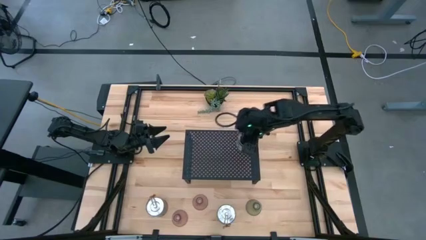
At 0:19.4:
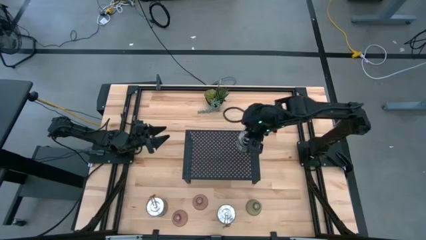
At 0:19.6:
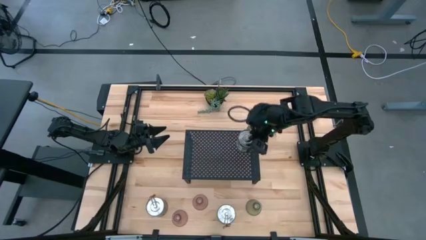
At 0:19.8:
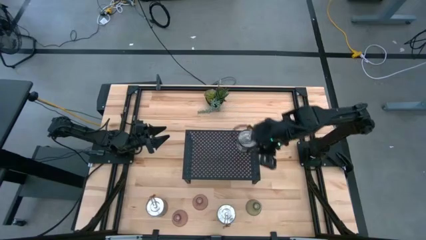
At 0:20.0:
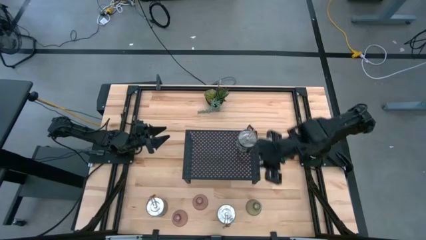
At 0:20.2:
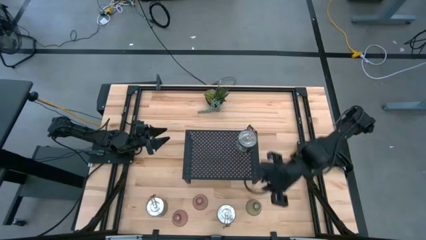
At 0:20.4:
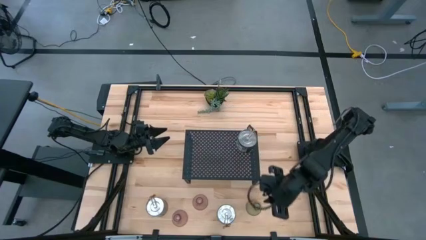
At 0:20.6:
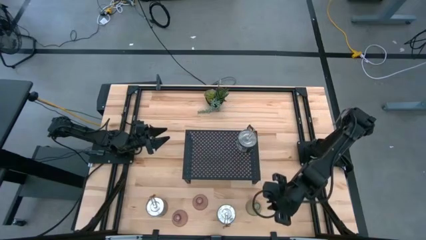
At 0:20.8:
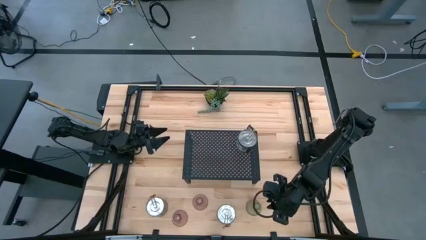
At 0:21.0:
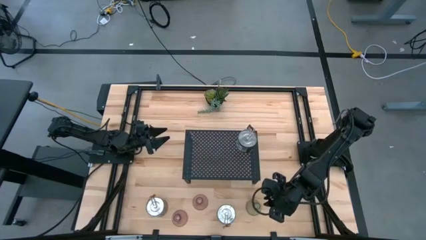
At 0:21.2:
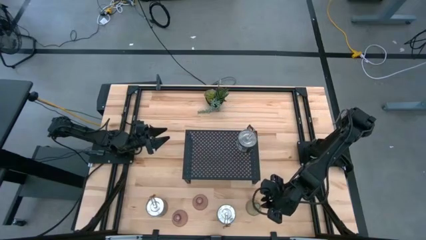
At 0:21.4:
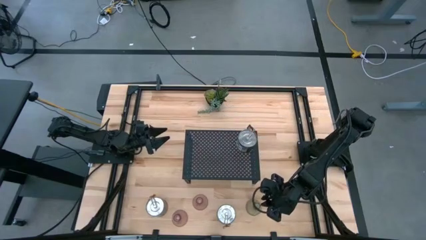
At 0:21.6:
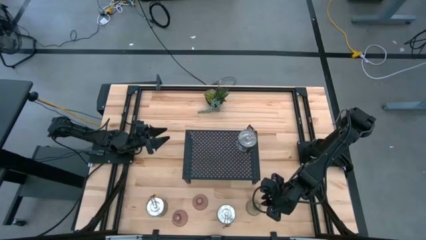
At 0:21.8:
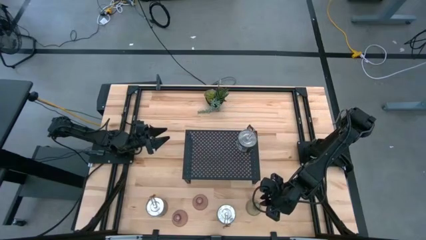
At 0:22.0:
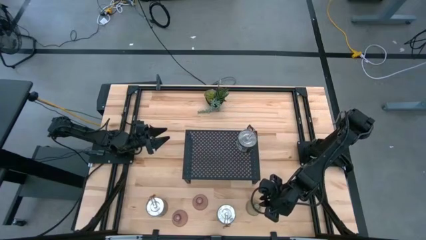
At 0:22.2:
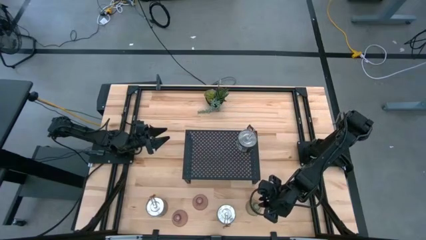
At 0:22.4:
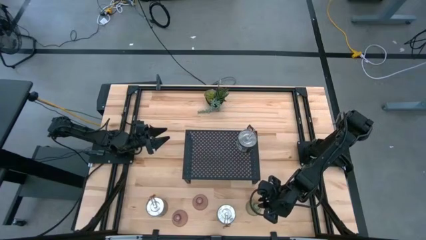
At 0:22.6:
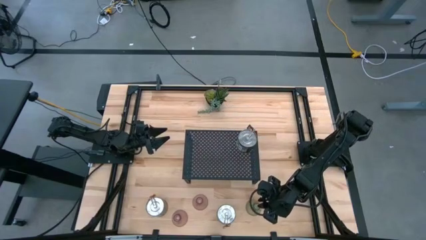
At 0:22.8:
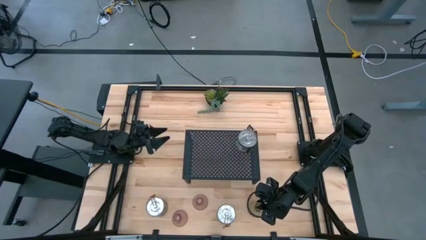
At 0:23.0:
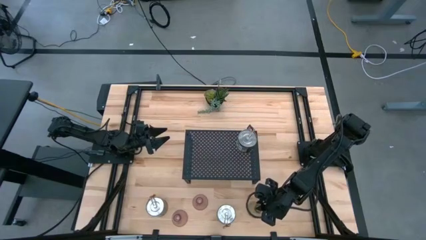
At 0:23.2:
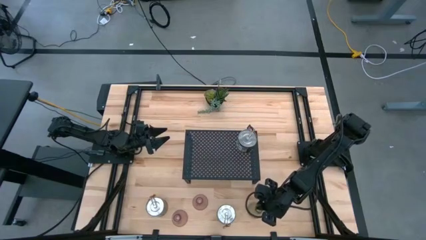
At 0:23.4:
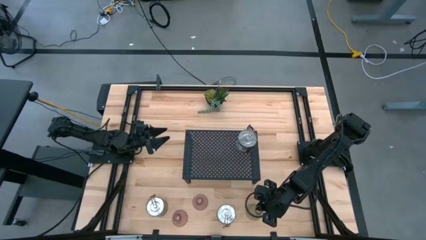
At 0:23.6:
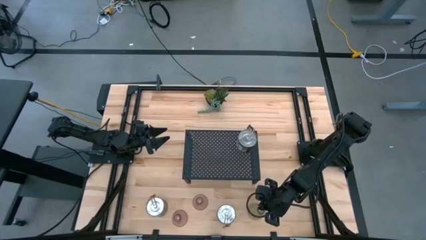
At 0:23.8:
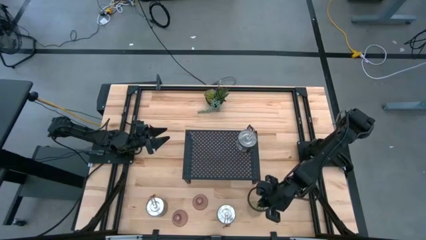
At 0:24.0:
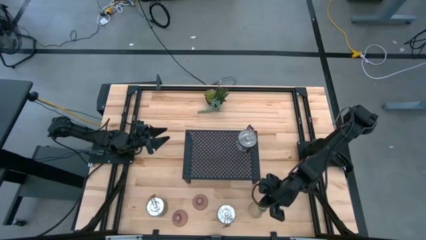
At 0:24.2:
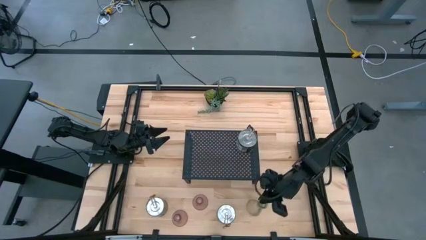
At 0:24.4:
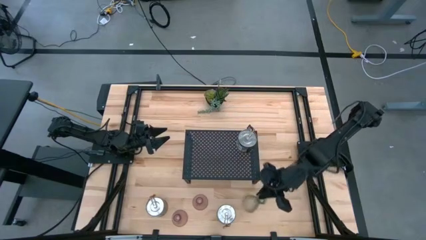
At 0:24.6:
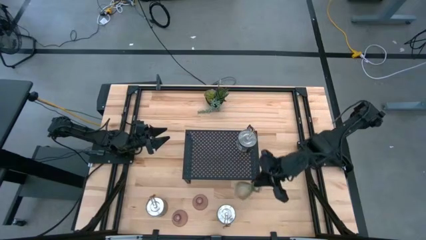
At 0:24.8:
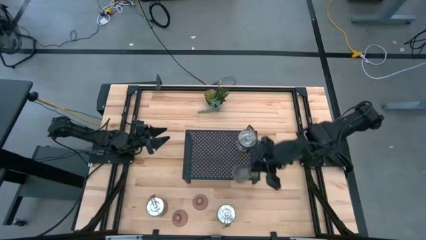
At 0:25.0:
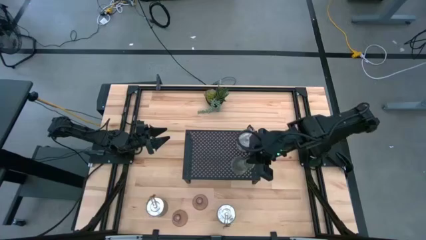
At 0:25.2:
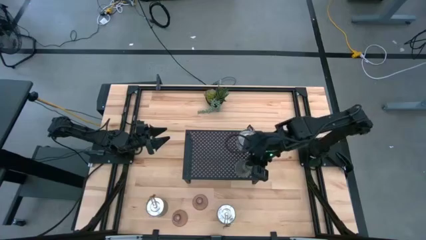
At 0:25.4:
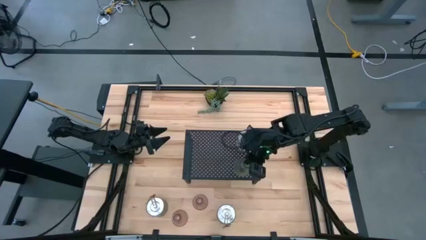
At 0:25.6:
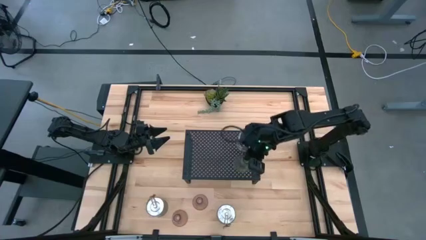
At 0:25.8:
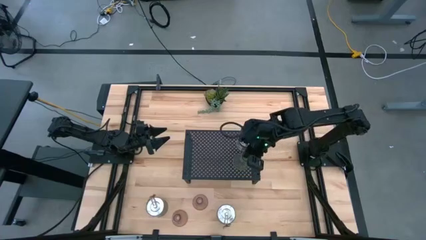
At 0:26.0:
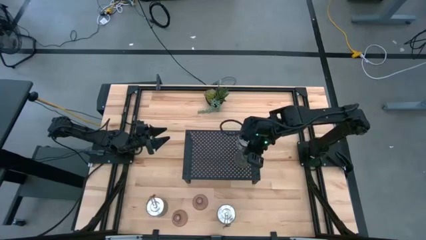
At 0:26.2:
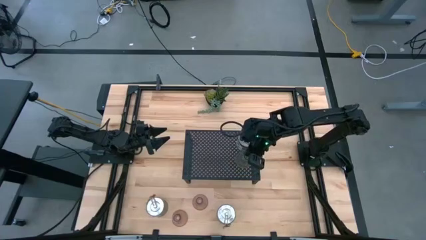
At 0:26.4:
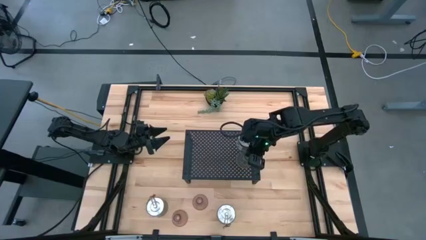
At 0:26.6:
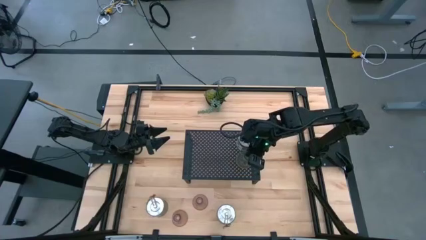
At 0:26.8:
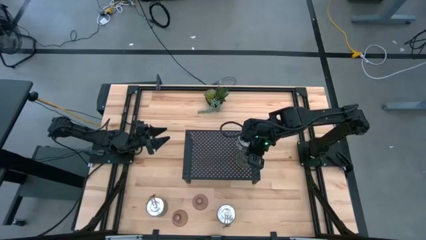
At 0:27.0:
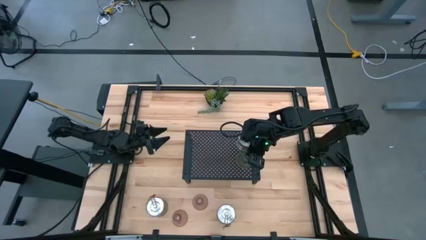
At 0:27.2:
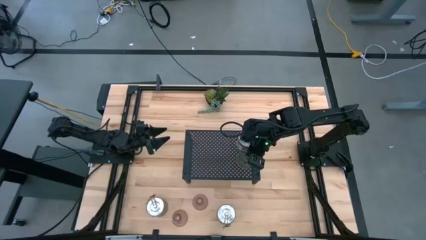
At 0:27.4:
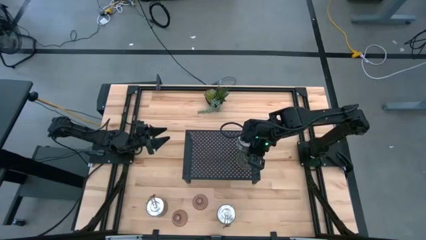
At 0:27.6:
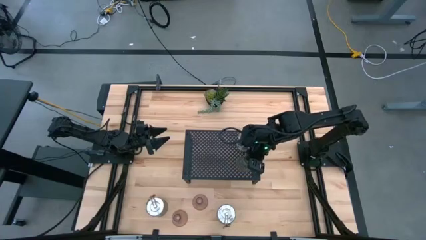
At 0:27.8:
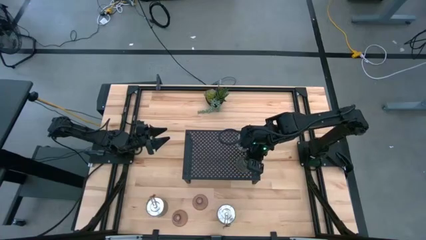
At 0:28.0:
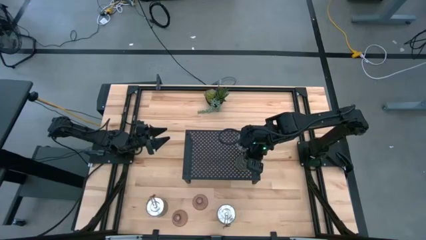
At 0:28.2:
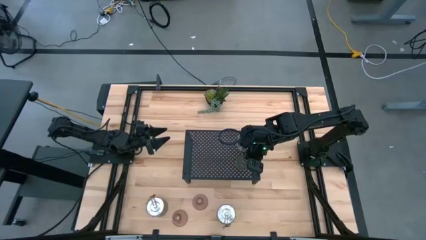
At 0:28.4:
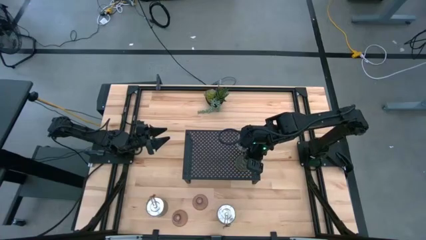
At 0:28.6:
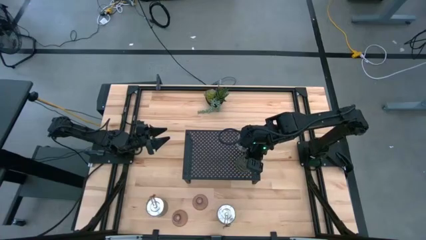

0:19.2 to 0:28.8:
Task: Pick & Place candle stick holders
Put the green glass candle holder on the shelf

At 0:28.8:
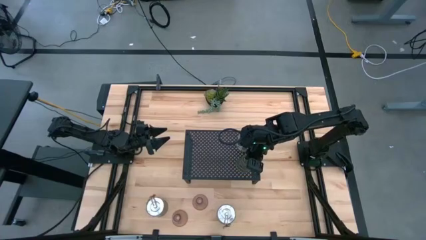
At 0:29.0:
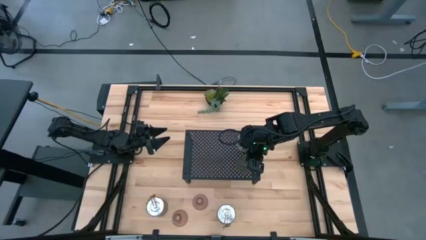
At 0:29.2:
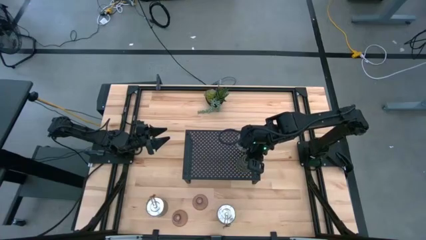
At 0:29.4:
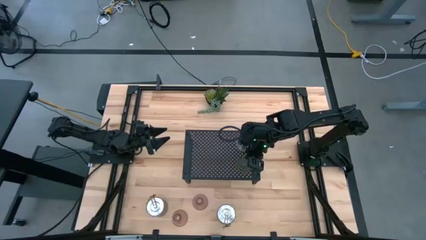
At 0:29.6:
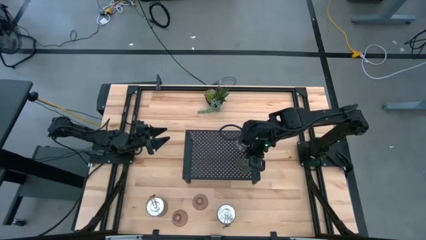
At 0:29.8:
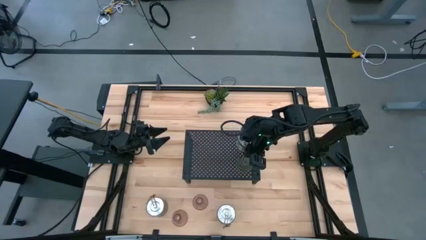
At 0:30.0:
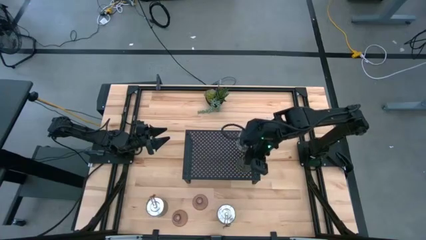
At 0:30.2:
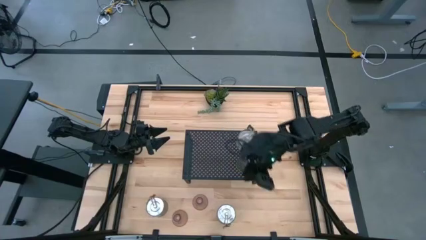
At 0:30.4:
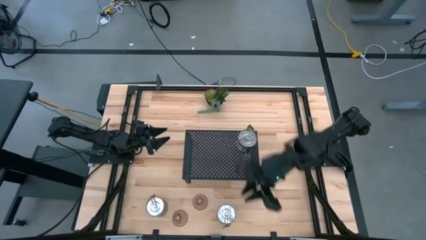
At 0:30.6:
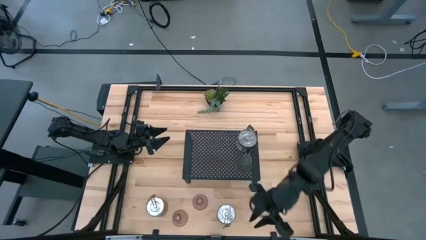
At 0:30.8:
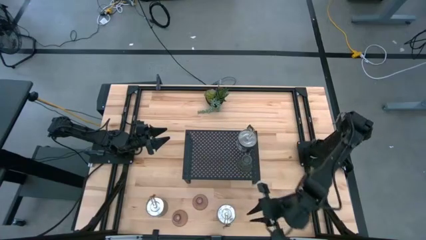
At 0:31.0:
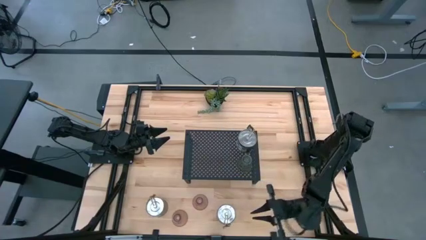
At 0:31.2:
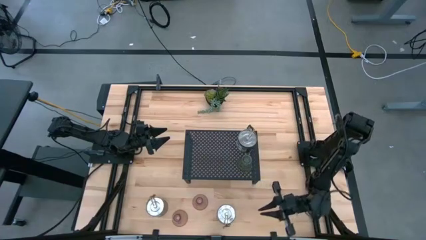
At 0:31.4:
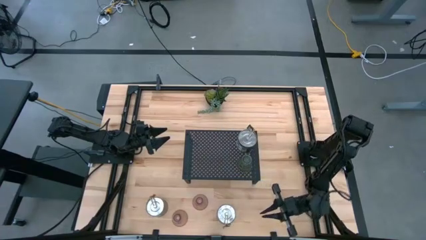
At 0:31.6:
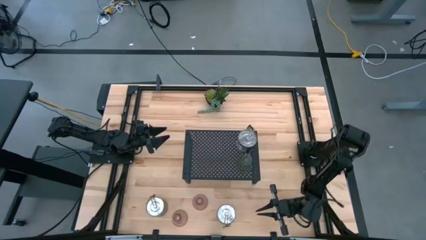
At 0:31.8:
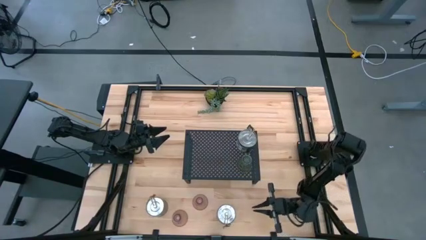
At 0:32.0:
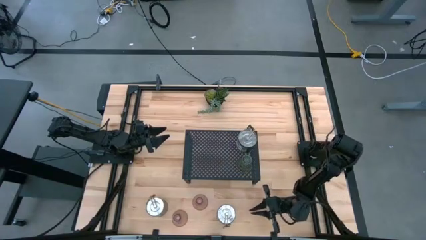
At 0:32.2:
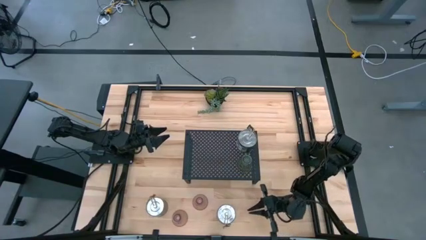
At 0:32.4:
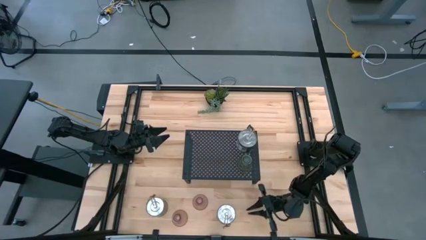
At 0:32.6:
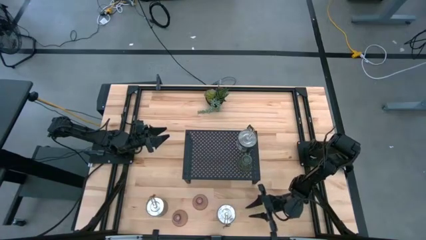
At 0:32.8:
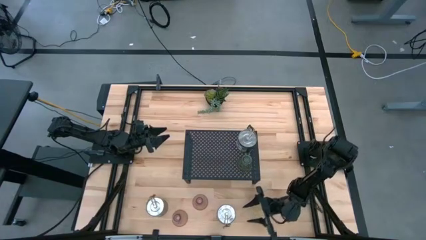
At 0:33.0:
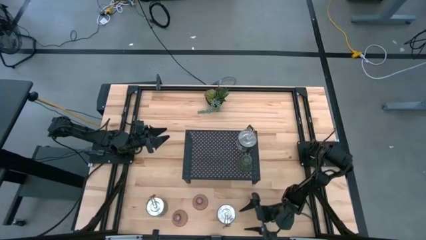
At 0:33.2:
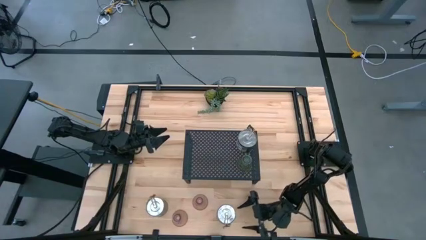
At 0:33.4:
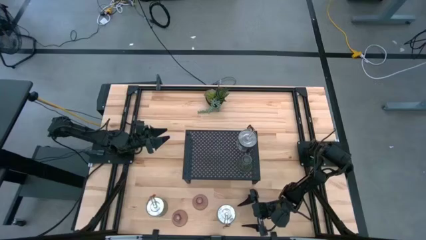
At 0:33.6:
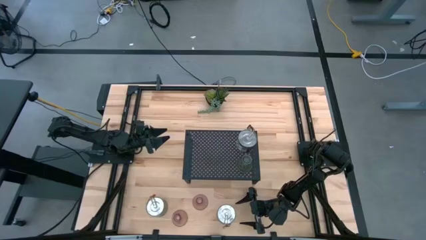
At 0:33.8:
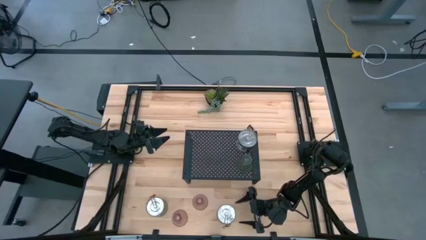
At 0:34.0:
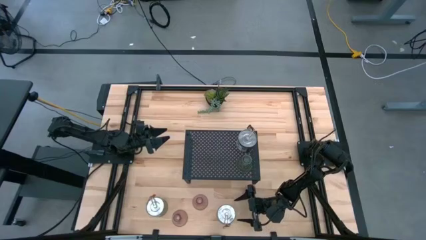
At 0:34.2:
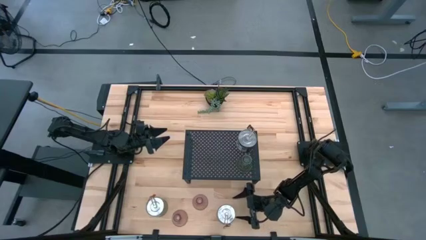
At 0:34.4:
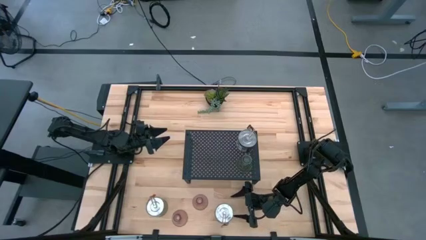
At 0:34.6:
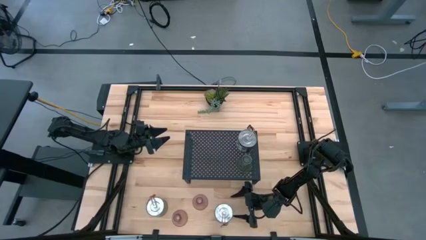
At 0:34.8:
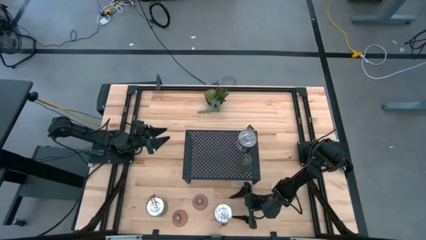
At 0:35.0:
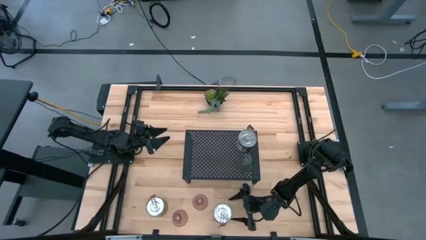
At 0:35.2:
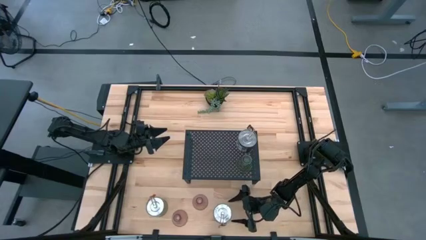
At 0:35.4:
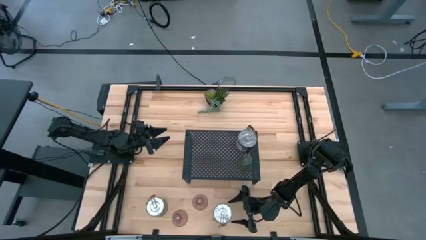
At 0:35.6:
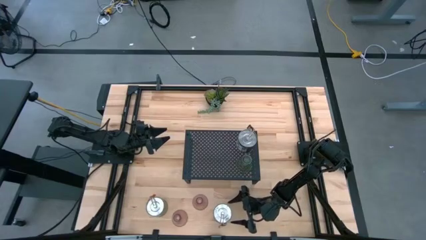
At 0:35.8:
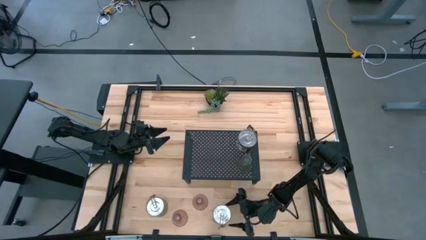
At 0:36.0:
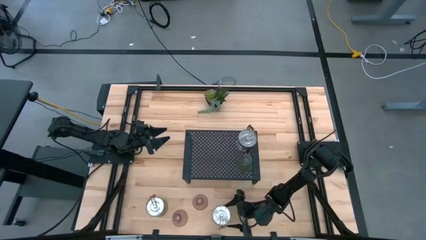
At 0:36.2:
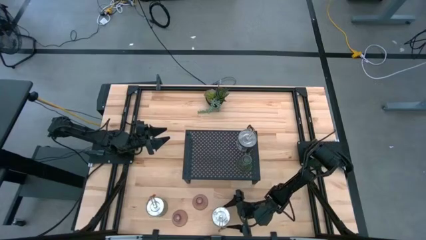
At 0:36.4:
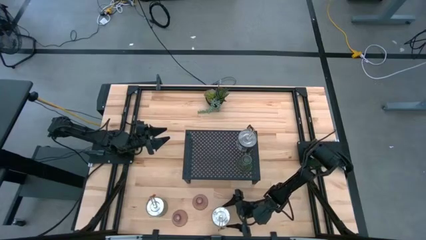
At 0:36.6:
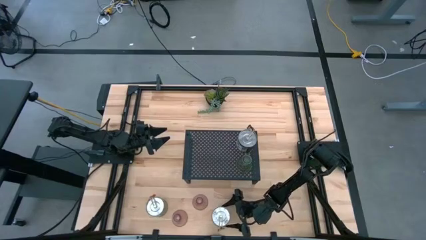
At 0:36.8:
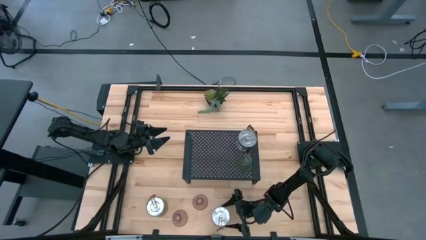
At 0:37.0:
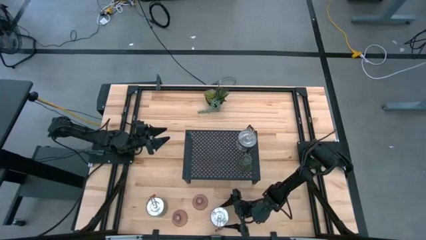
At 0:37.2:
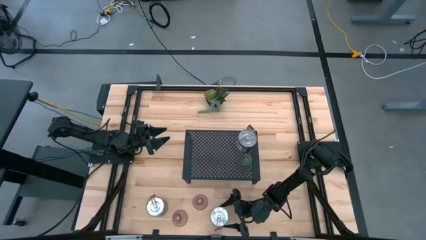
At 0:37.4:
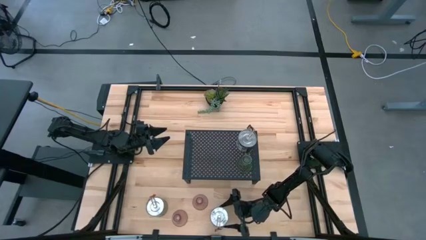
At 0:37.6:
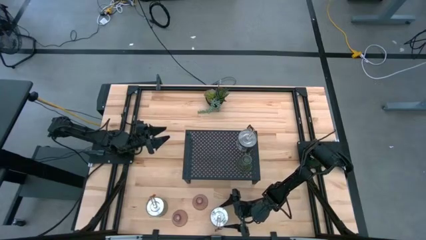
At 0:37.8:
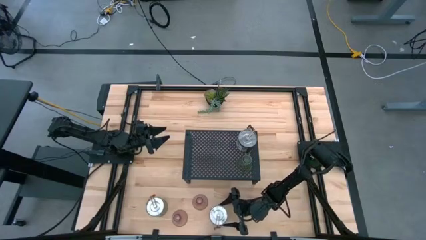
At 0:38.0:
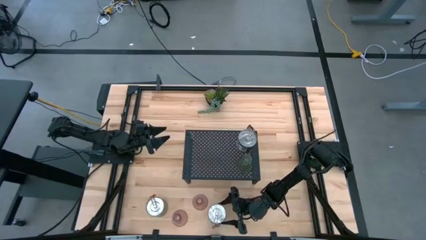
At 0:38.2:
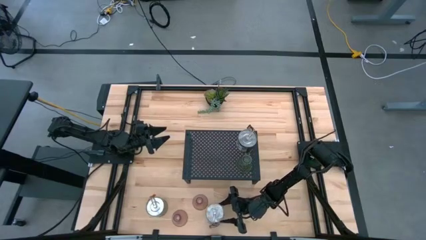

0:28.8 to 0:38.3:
Put the right silver scented candle on the black shelf aligned with the other silver scented candle
